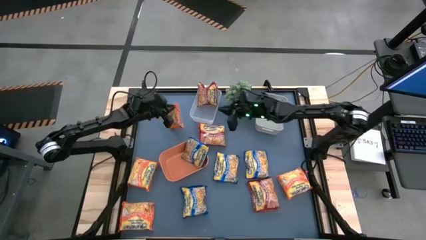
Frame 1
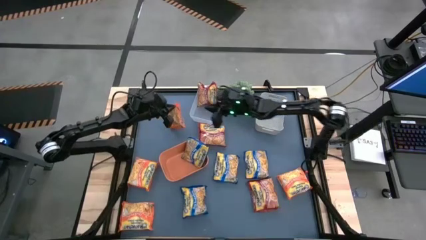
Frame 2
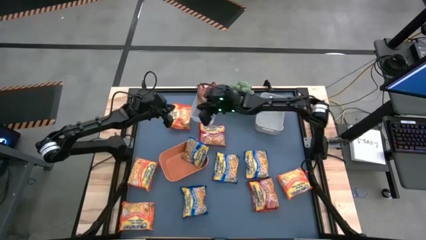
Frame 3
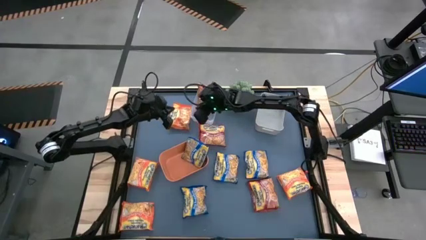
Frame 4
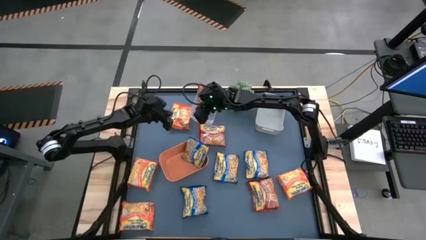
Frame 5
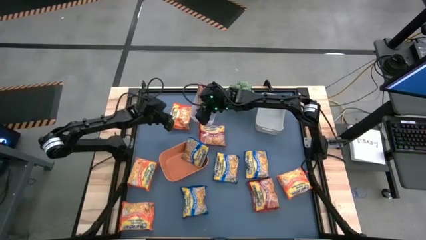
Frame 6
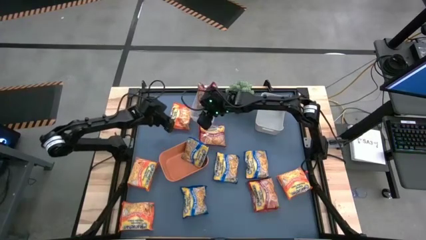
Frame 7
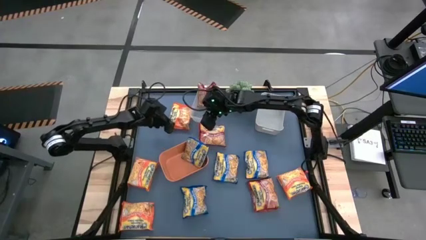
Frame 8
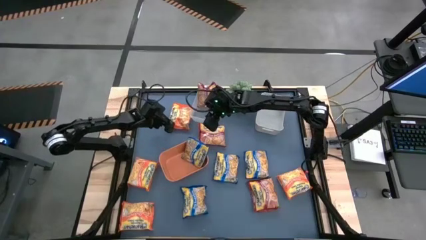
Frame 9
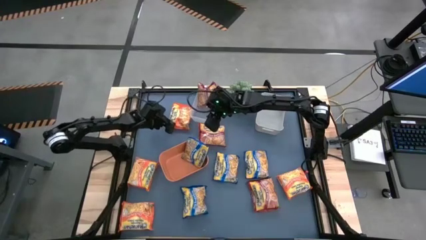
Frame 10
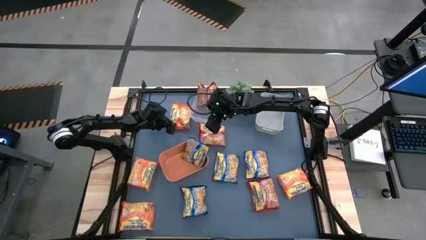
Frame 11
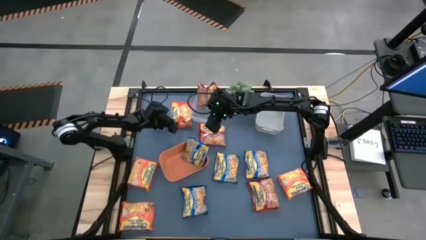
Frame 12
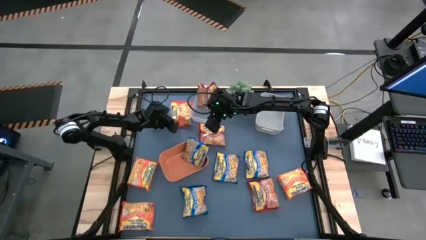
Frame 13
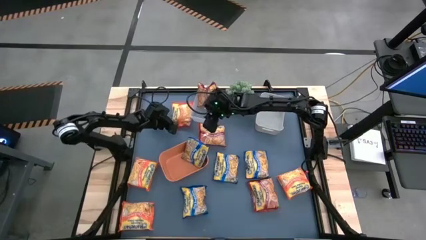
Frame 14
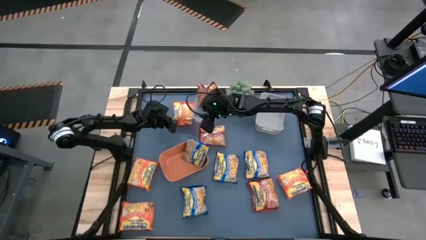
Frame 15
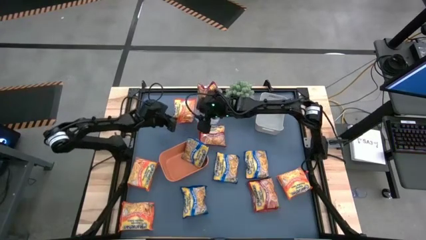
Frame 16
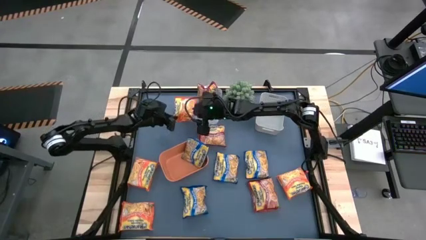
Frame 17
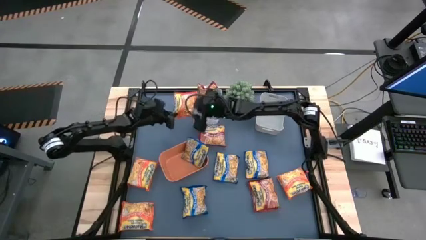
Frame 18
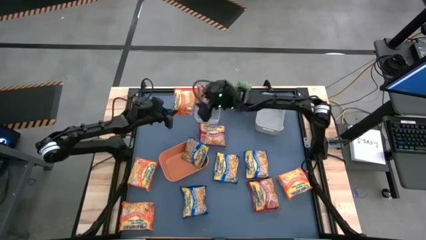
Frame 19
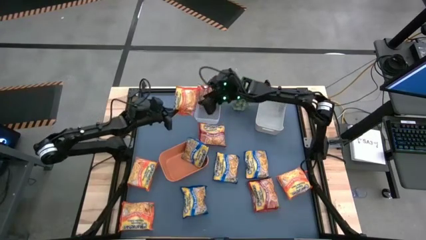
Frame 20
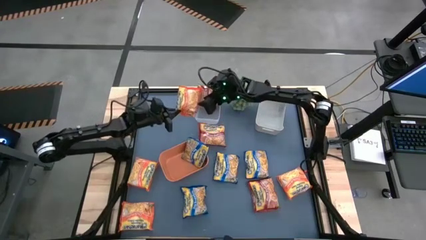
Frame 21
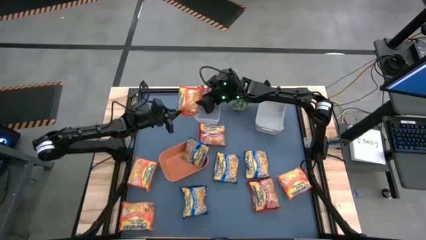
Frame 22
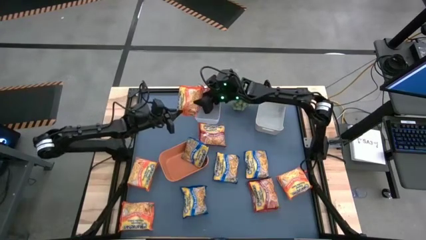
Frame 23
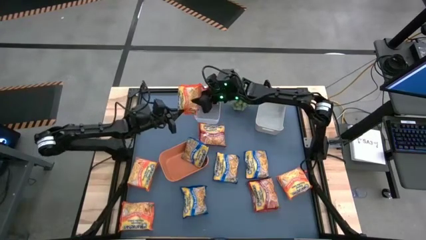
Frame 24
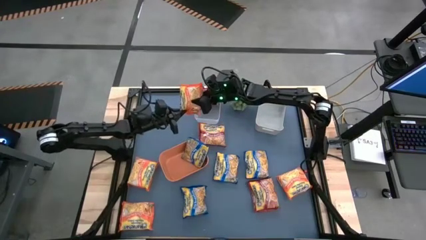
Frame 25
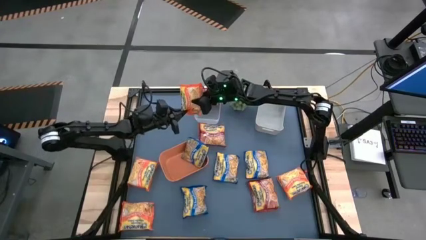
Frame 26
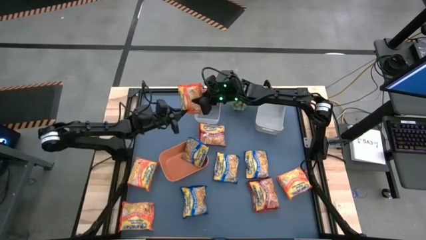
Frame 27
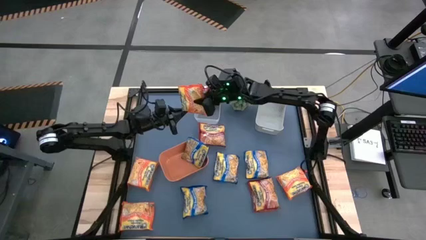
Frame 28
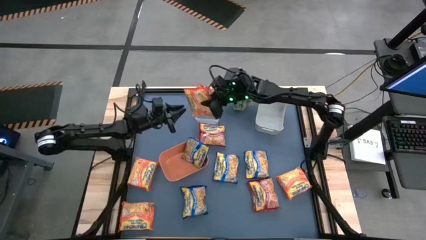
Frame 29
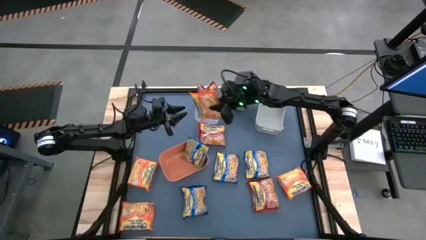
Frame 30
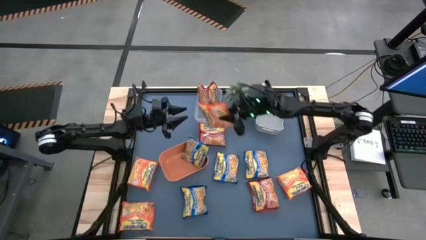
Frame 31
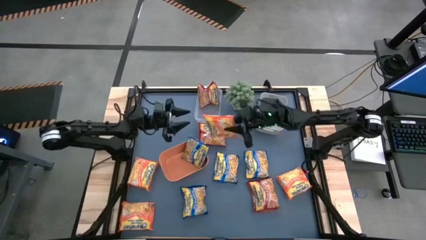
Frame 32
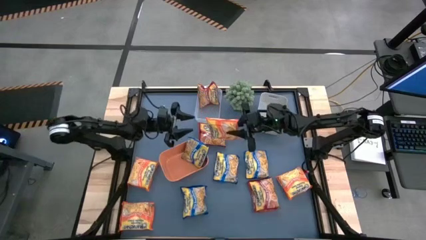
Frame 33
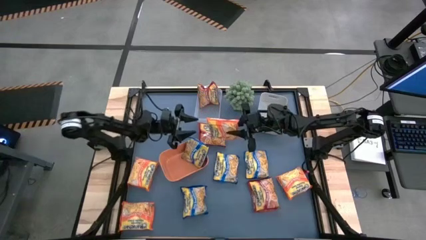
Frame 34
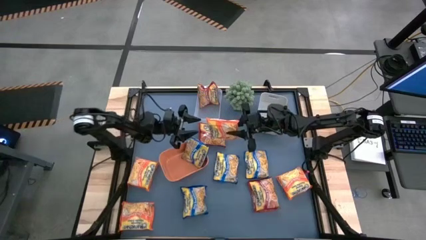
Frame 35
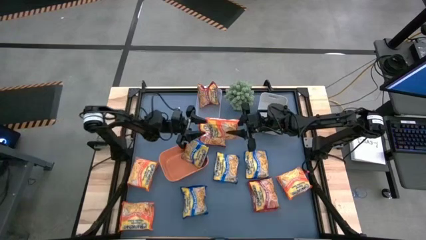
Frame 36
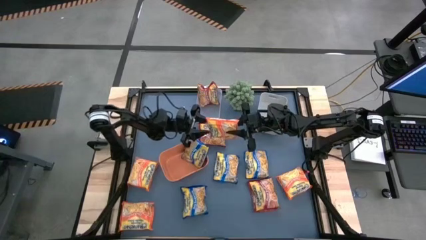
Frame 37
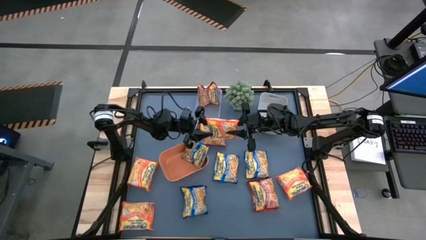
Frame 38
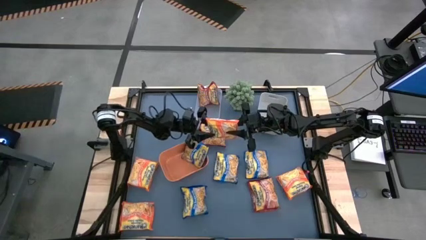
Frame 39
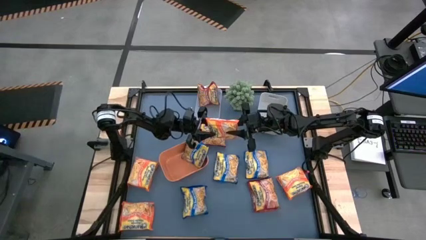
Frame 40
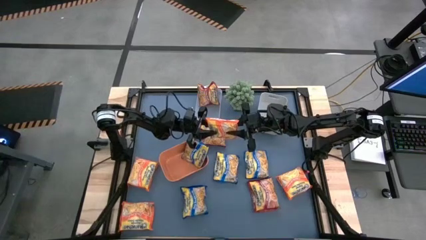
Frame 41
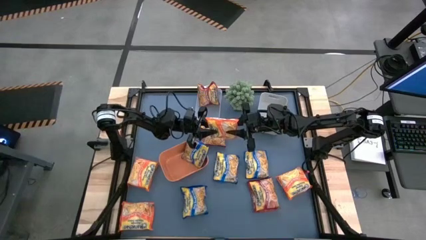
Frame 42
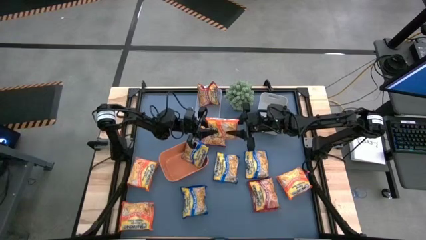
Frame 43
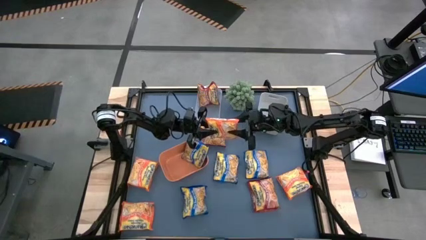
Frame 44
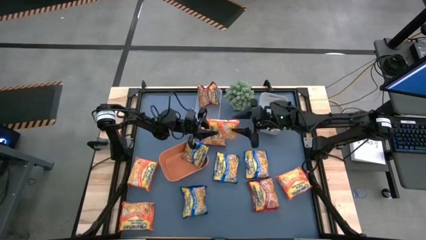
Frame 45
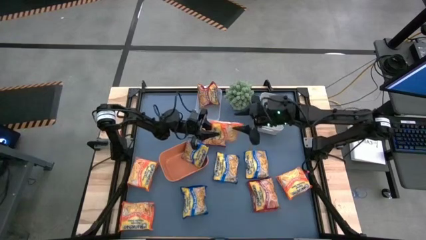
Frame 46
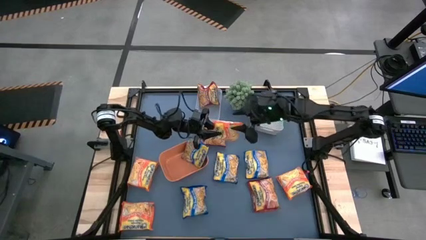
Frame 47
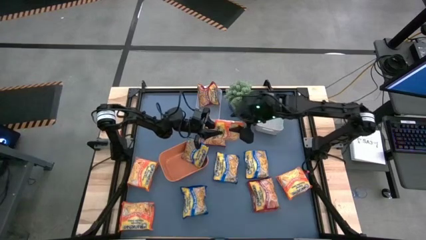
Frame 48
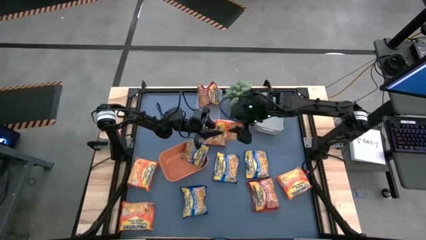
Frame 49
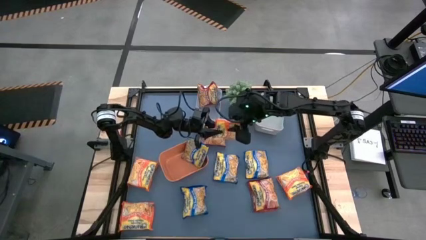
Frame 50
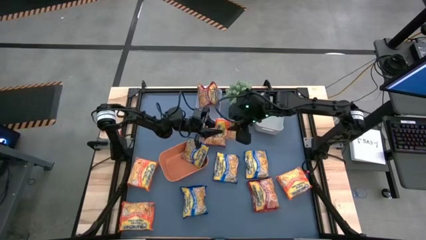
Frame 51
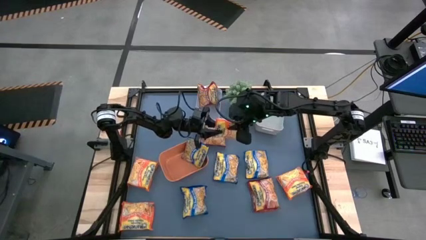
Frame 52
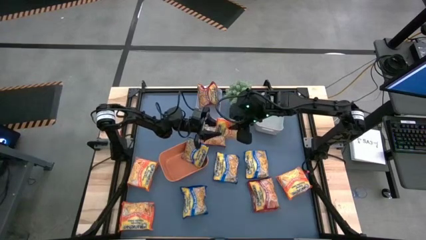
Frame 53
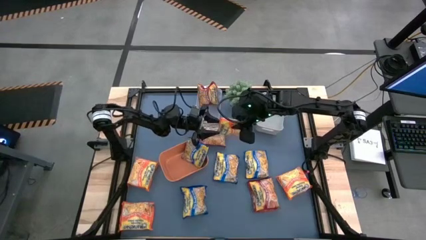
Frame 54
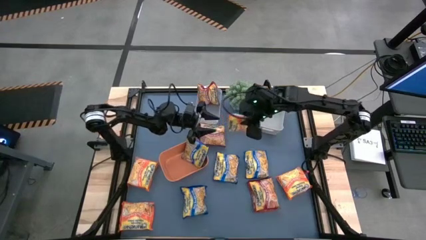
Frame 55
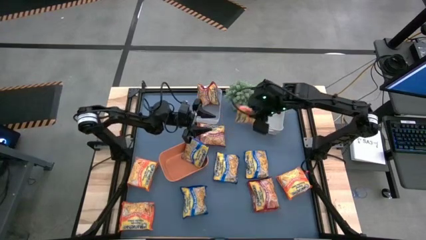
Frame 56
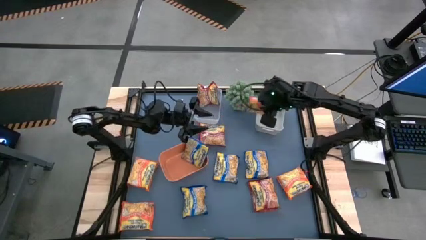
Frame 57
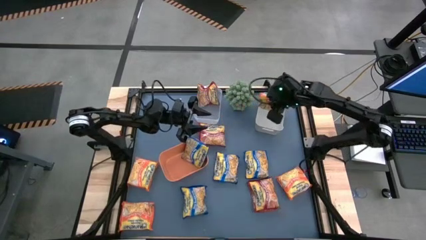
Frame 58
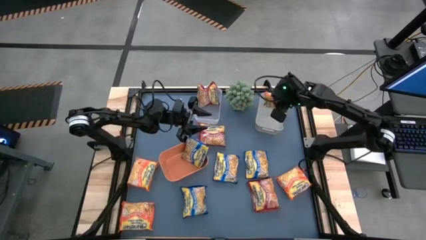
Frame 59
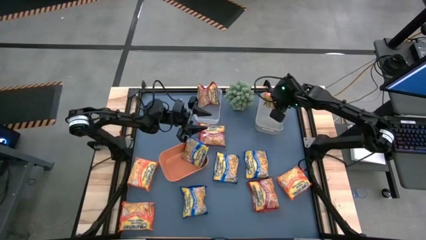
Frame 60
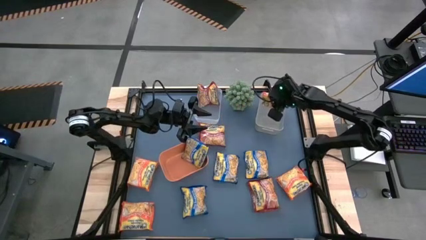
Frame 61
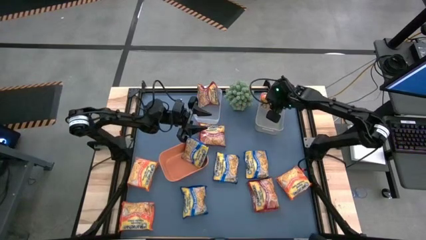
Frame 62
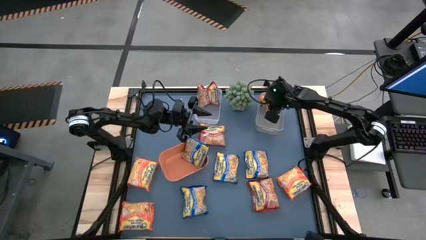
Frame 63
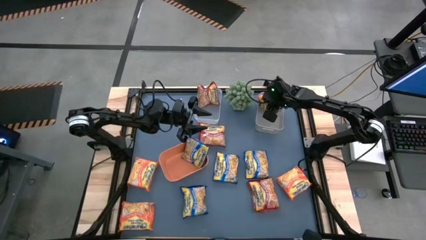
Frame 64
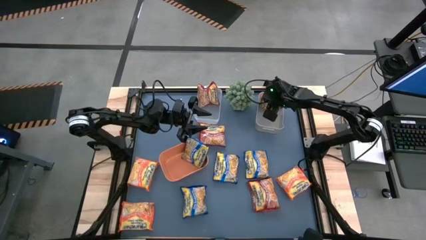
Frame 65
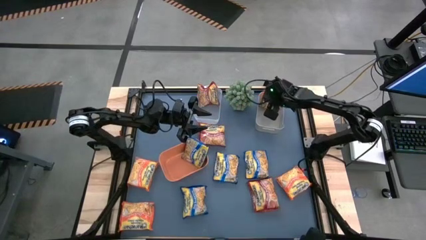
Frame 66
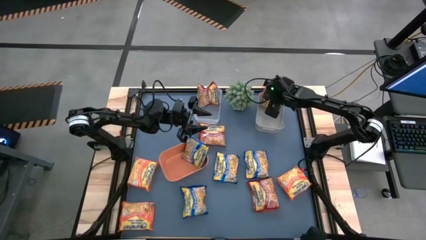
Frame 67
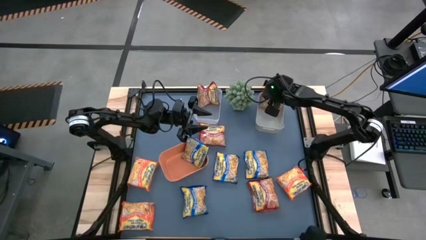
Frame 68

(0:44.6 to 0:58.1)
Task: Sort Maruchan noodles
Put the orange noodle pack into the gray bin

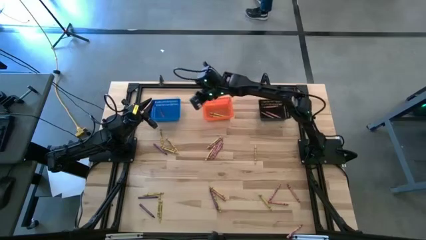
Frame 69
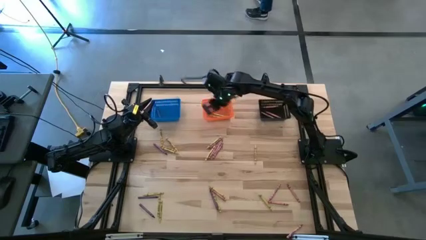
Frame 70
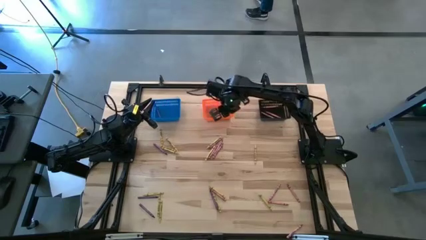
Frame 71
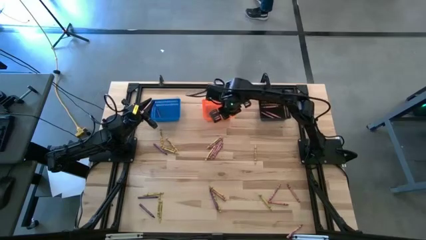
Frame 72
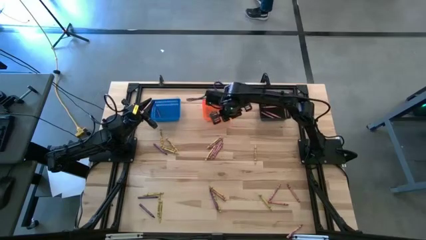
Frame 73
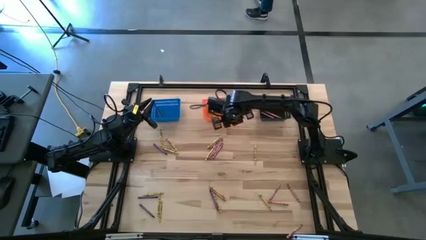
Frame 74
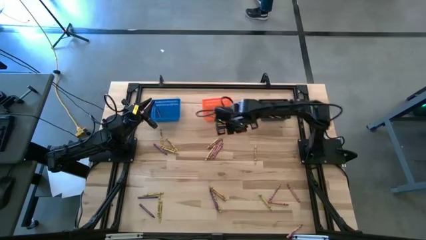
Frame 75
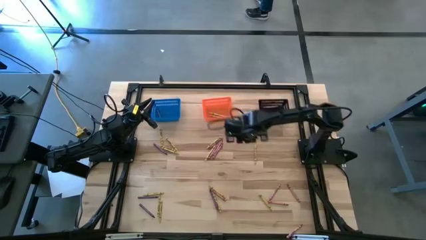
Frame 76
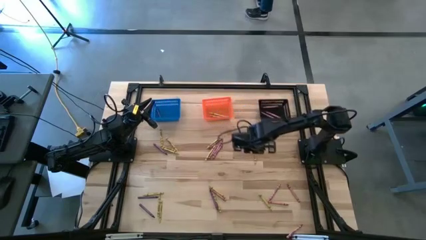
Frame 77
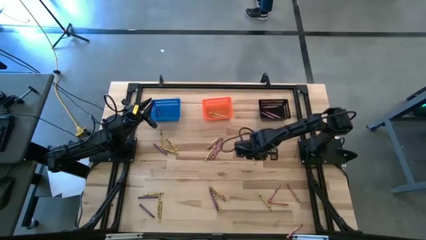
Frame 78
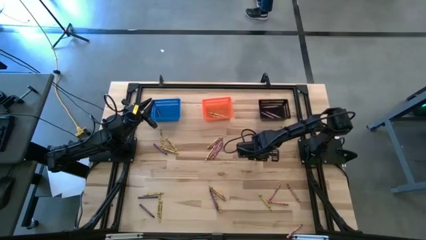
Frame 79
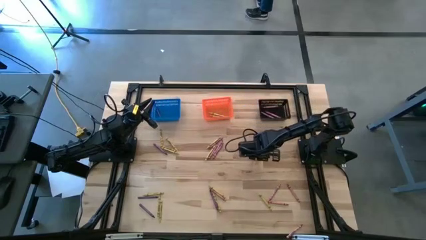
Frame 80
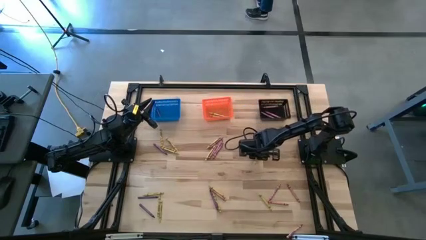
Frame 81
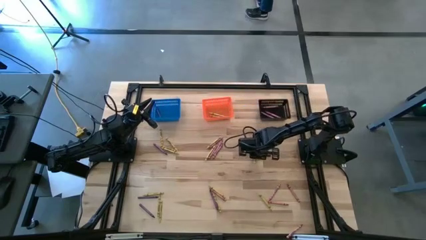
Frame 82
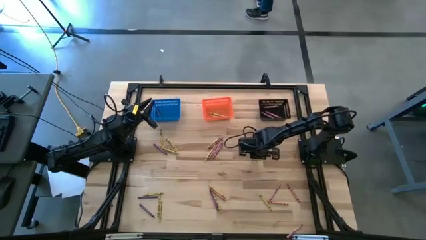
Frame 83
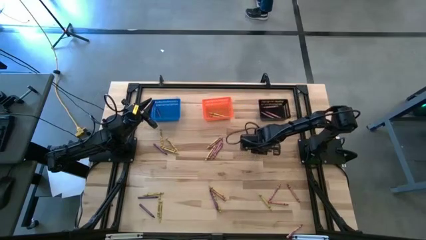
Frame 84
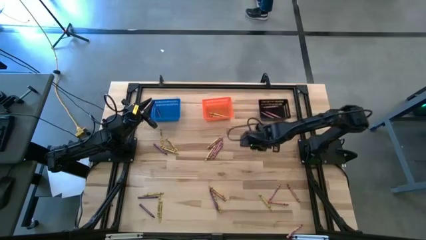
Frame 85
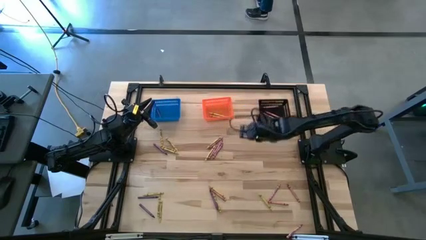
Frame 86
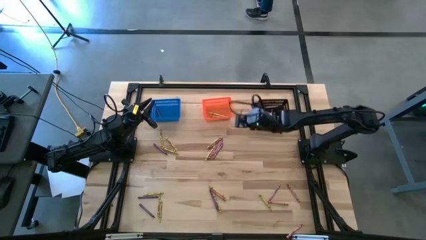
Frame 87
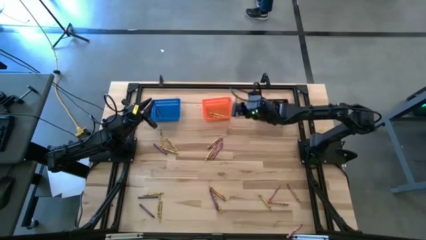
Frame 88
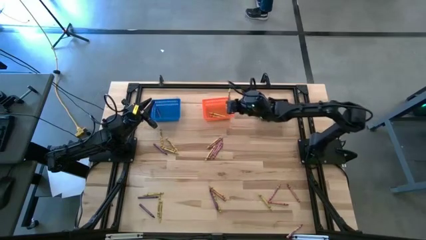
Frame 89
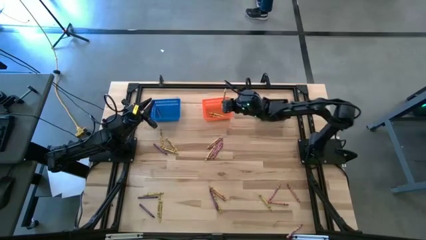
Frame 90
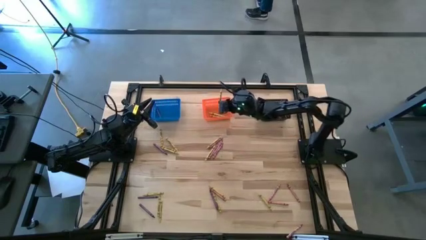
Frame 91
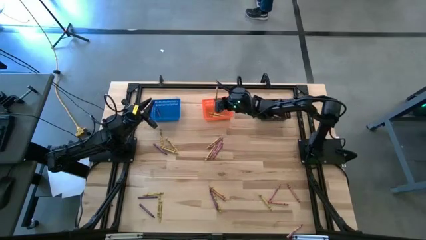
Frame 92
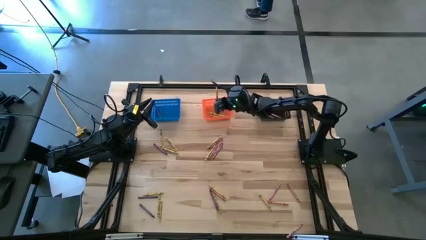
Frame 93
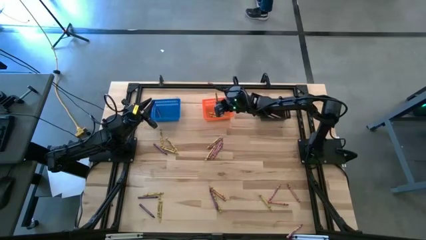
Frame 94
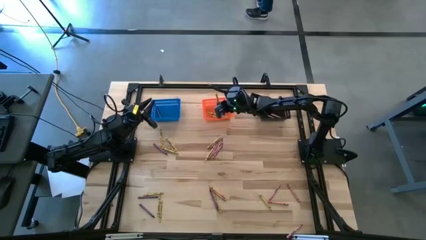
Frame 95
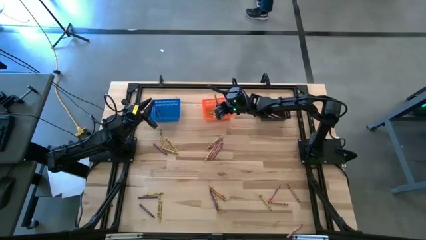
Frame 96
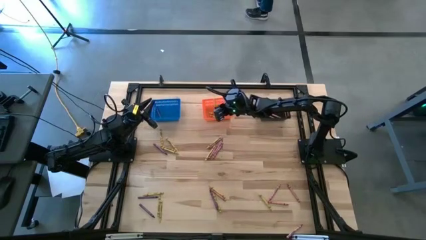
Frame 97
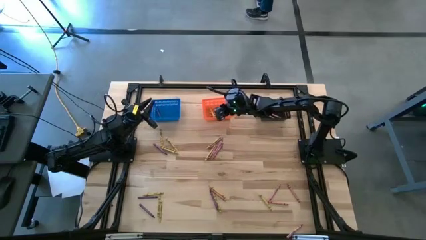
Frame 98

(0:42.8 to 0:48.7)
Task: Sort crayons
Put the yellow crayon into the orange bin
